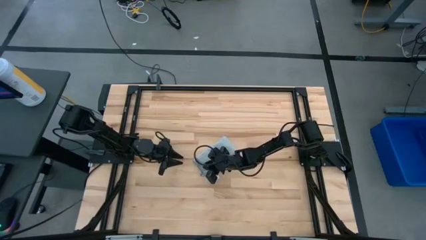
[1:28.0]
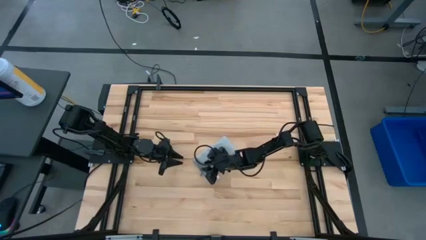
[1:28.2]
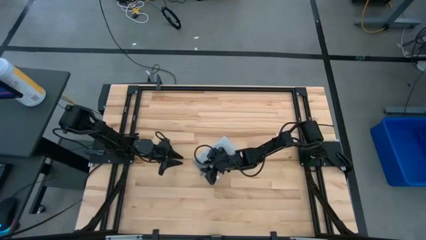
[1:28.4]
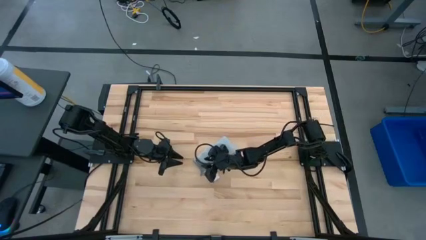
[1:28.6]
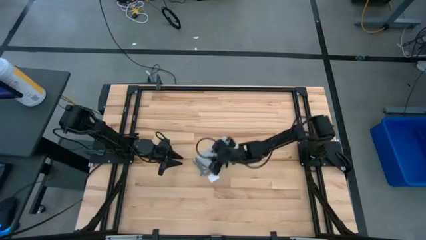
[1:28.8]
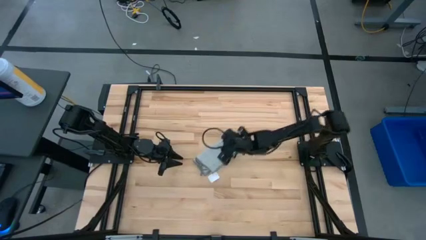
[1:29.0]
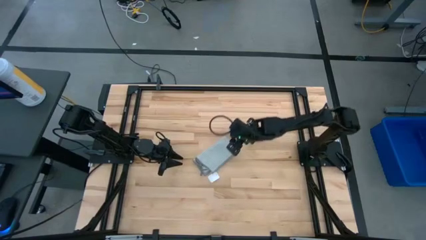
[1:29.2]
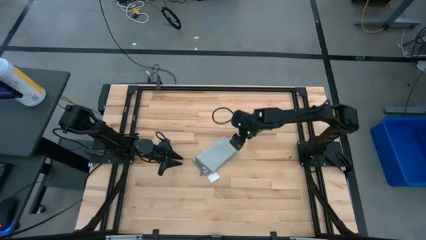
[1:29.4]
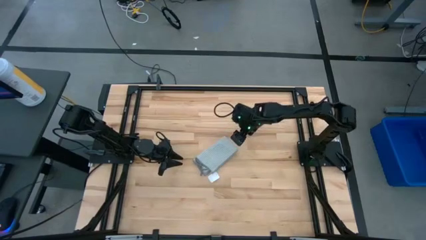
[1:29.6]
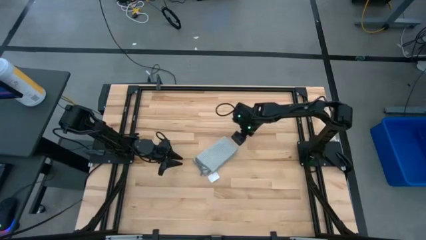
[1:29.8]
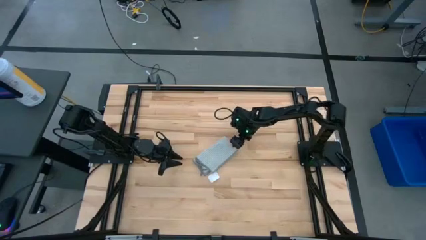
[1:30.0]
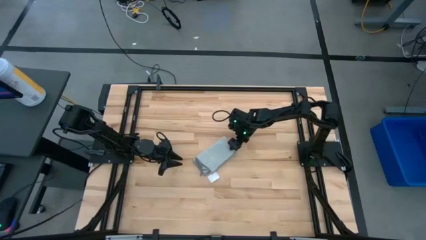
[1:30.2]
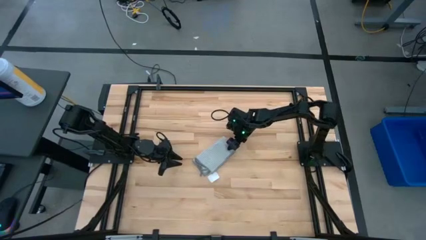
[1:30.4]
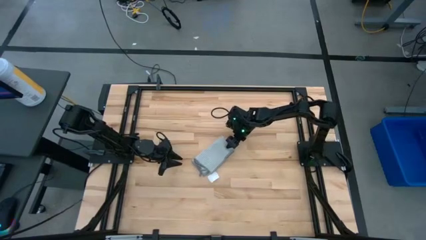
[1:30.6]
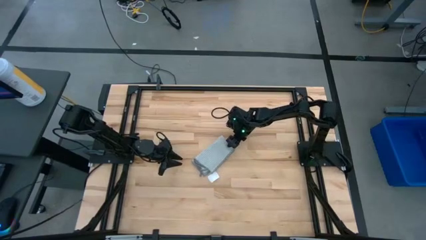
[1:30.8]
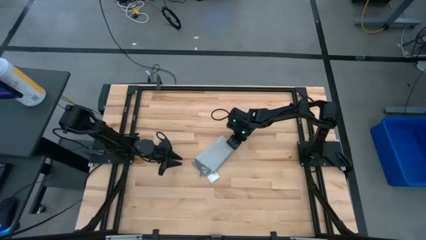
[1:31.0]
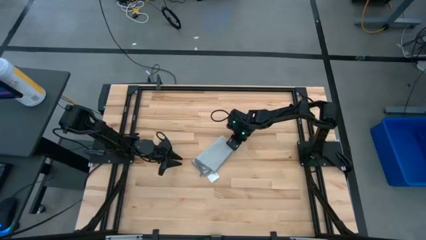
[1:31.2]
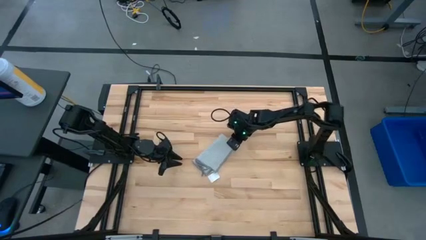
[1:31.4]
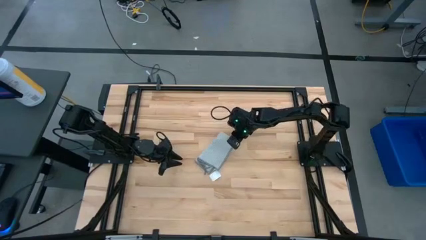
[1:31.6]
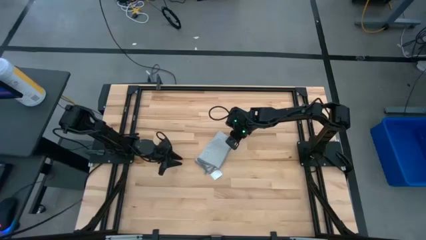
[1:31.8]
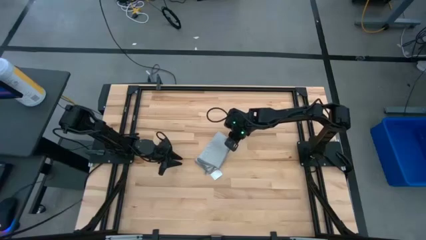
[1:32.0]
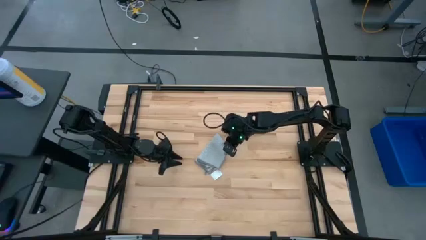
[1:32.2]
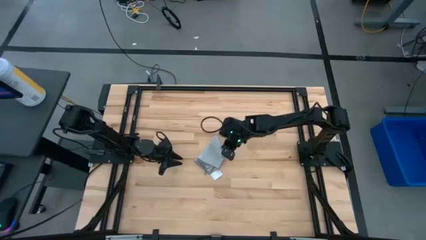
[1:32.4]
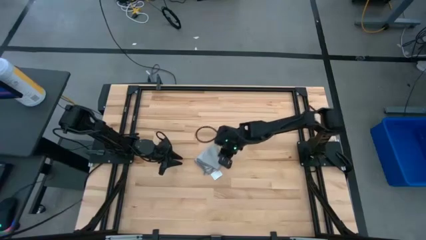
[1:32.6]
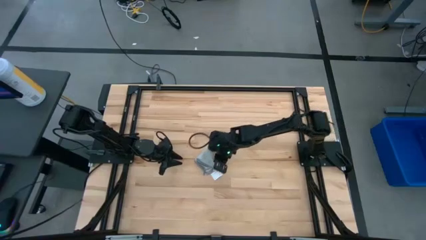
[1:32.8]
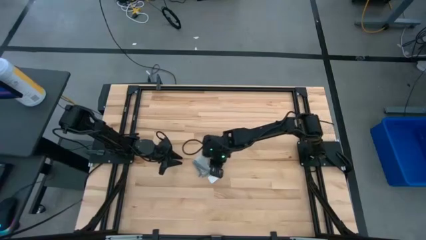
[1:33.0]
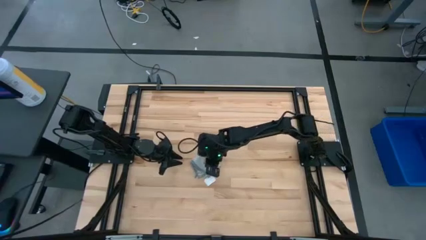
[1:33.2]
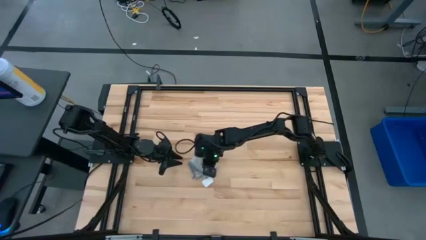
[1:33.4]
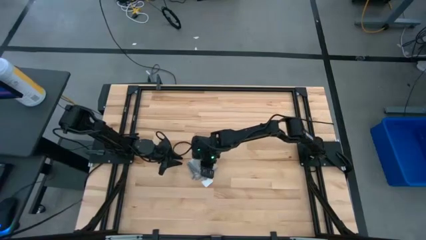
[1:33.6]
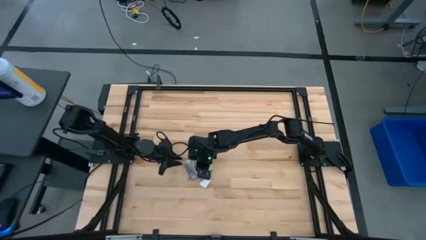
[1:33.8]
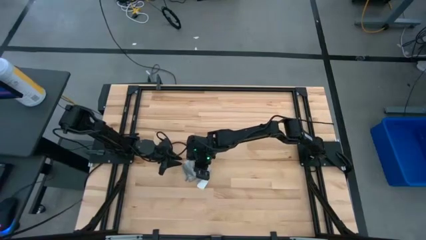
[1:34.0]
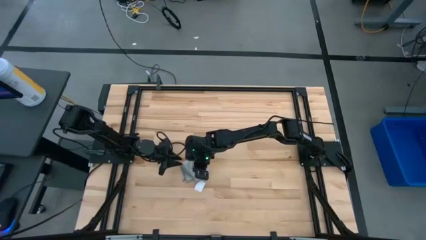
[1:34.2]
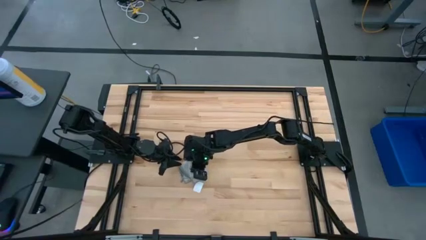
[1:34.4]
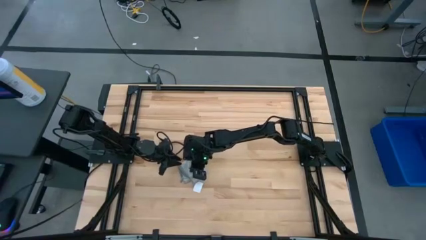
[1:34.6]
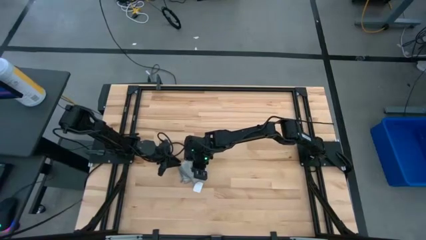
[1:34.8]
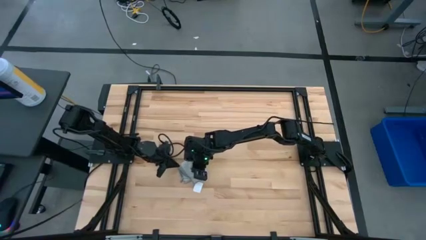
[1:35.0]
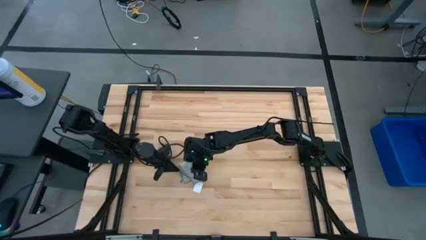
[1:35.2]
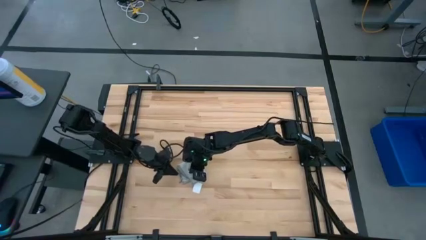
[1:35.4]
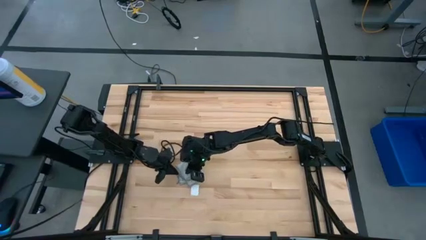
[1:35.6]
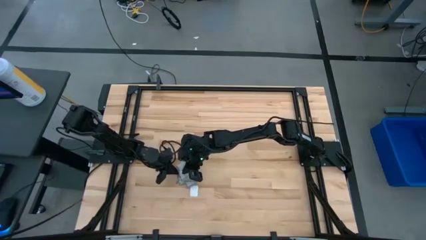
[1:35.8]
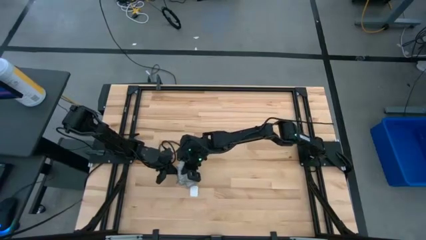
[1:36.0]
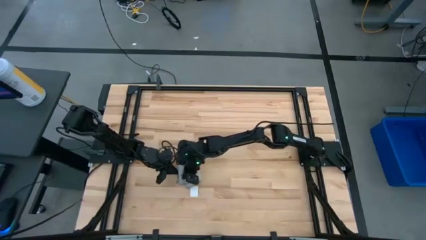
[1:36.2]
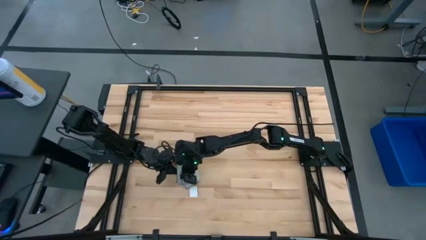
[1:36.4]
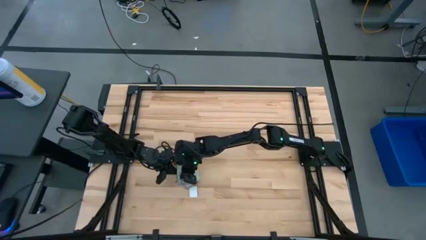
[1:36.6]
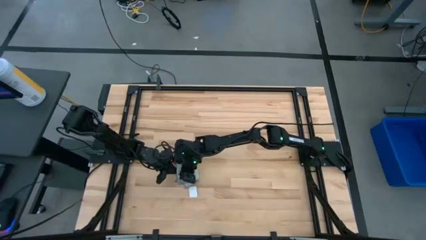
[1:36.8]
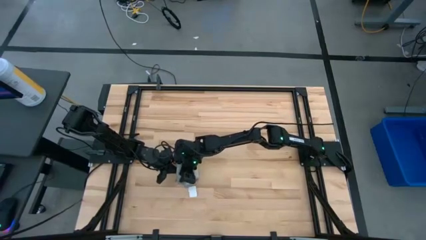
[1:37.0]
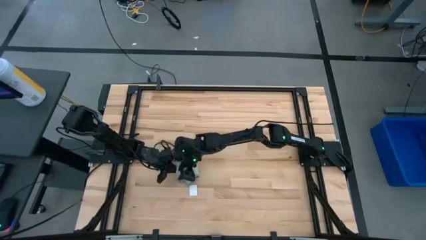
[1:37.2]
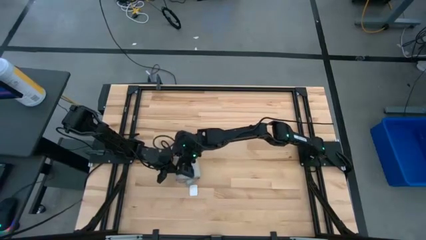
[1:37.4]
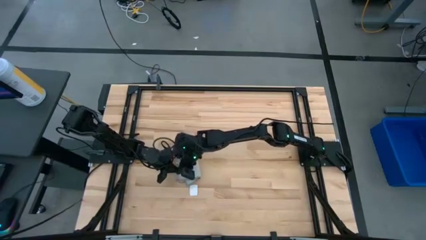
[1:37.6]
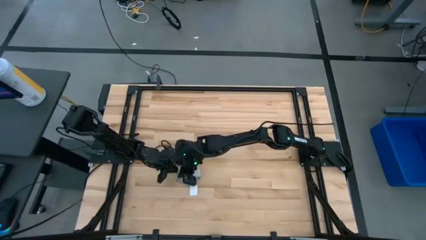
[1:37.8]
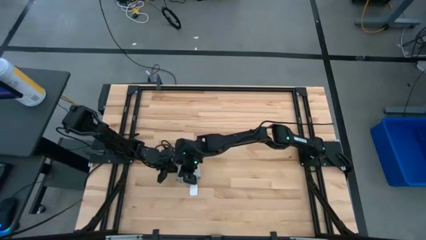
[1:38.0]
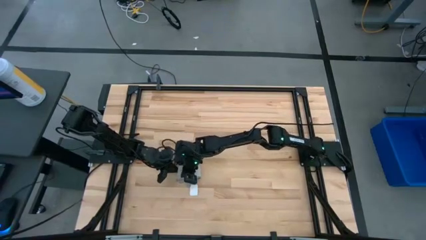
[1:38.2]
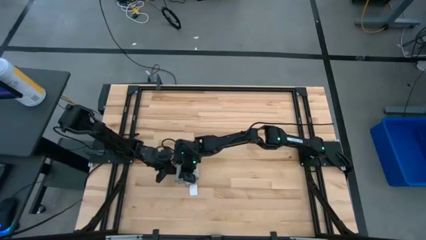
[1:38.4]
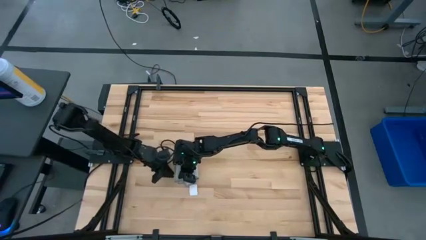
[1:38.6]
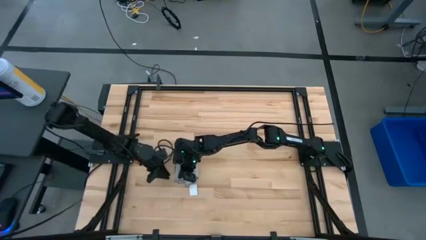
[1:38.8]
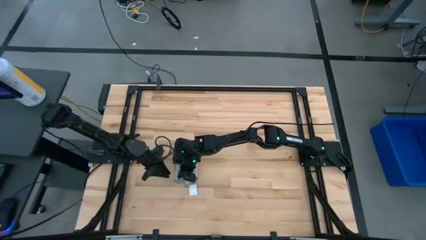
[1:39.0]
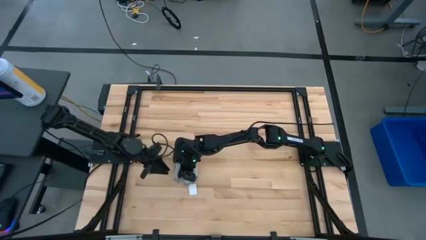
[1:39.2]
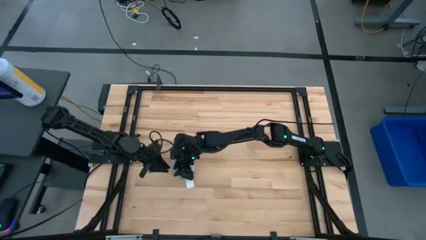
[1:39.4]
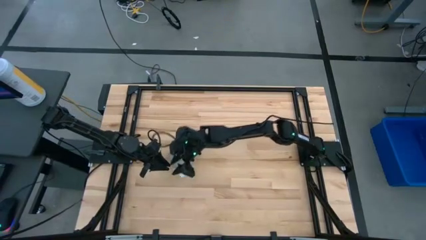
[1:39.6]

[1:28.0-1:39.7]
Task: Fold microfiber towels
Fold the gray towel
